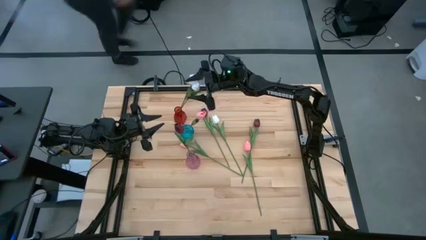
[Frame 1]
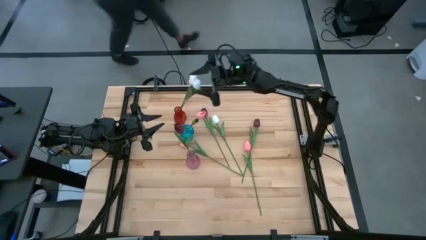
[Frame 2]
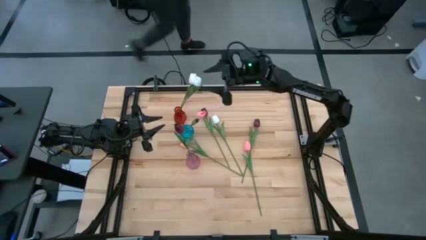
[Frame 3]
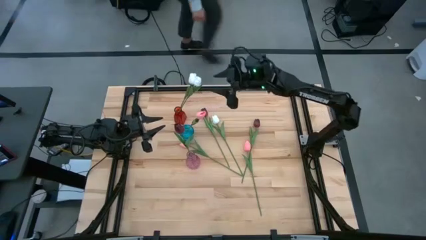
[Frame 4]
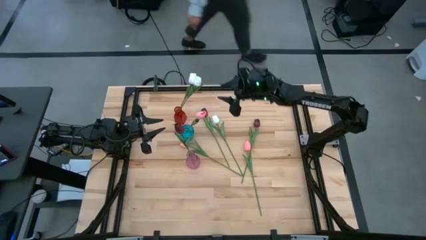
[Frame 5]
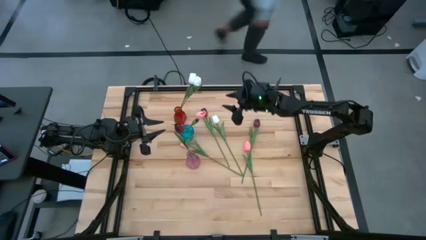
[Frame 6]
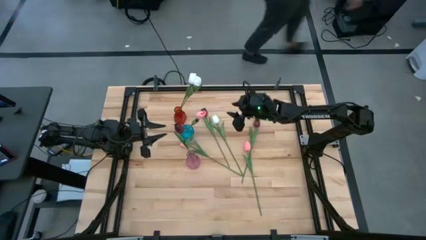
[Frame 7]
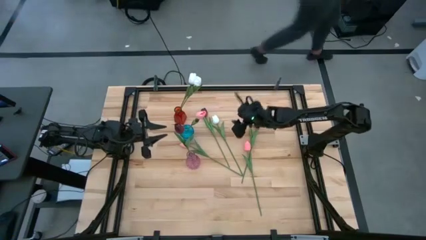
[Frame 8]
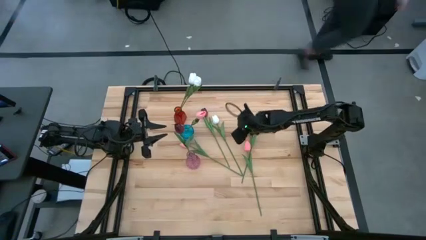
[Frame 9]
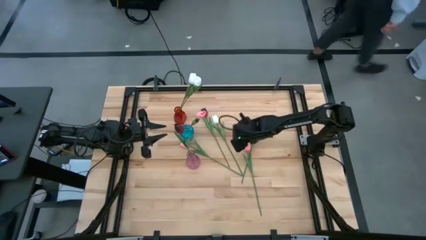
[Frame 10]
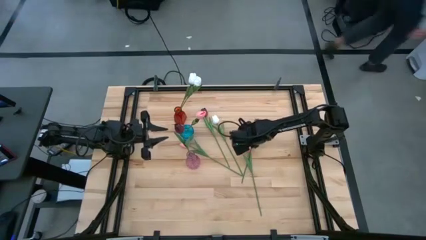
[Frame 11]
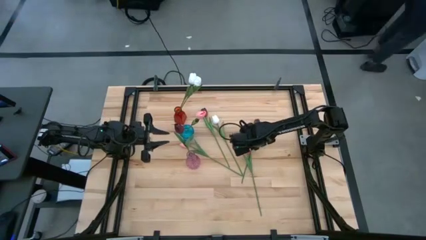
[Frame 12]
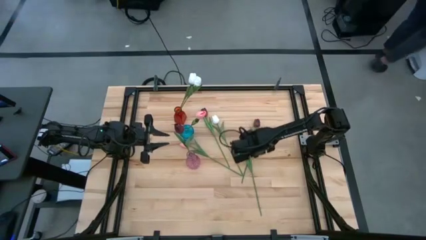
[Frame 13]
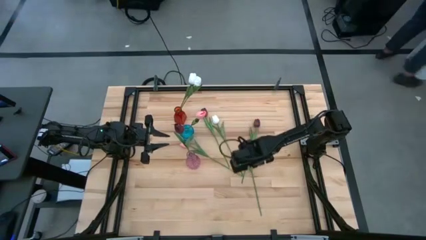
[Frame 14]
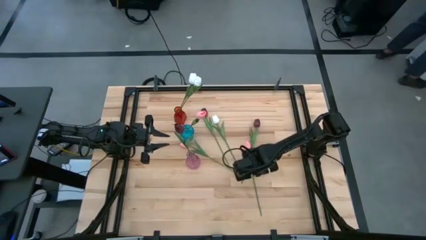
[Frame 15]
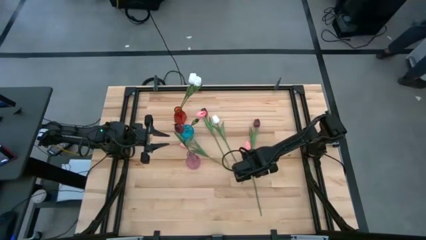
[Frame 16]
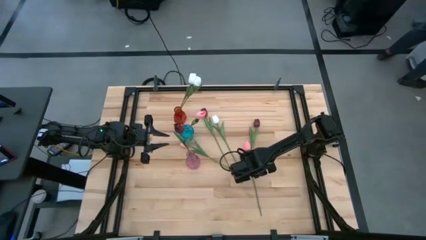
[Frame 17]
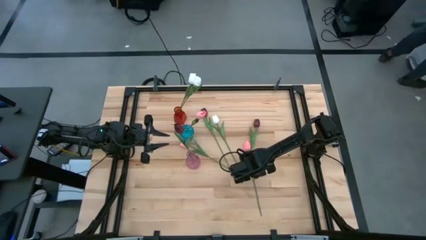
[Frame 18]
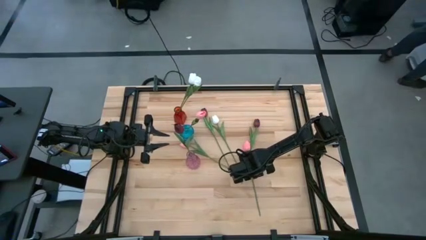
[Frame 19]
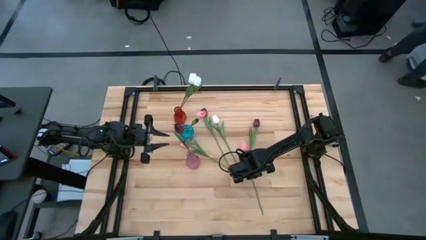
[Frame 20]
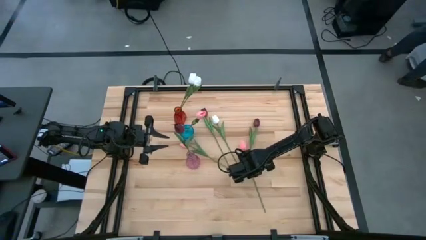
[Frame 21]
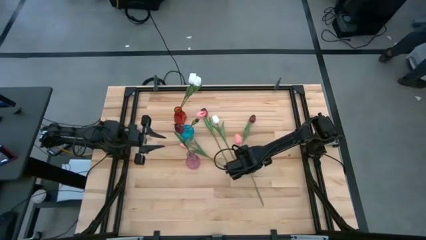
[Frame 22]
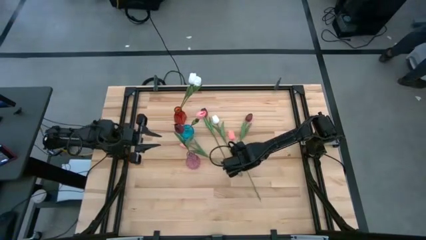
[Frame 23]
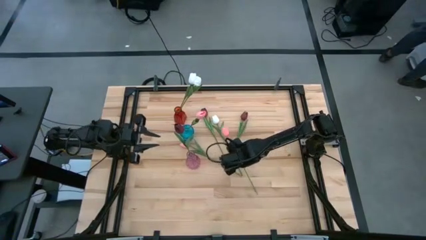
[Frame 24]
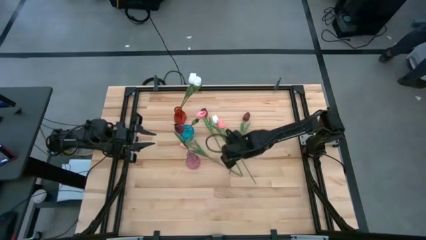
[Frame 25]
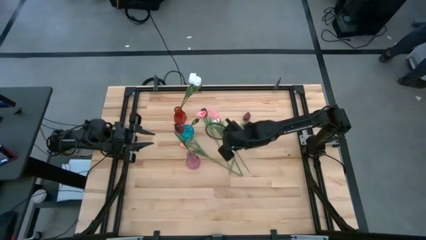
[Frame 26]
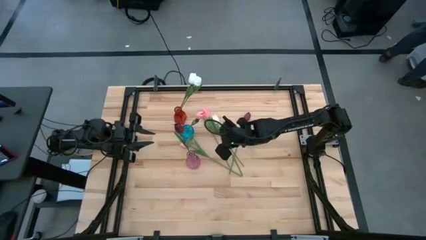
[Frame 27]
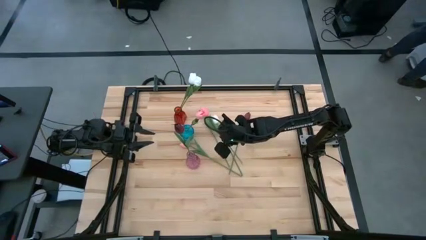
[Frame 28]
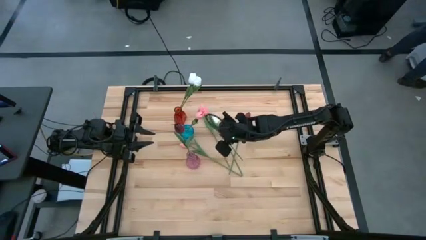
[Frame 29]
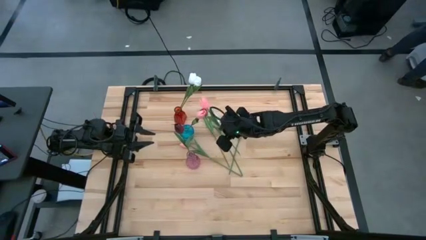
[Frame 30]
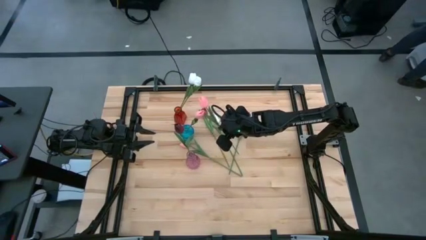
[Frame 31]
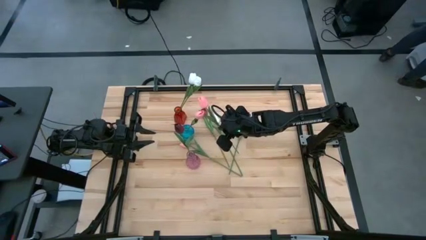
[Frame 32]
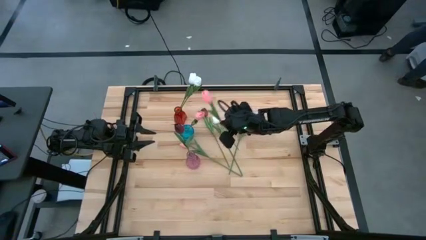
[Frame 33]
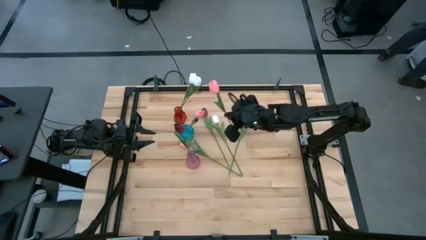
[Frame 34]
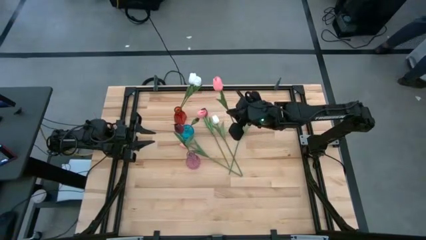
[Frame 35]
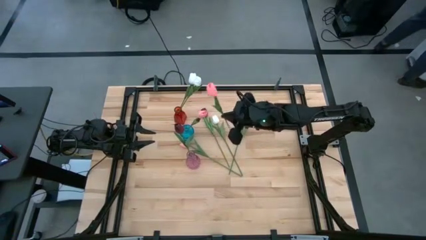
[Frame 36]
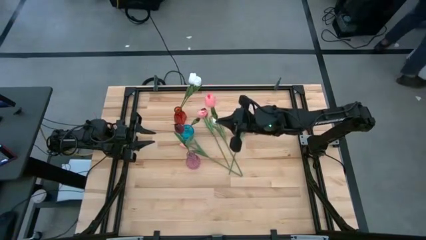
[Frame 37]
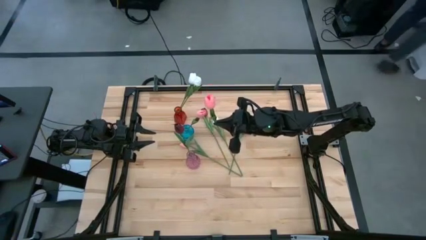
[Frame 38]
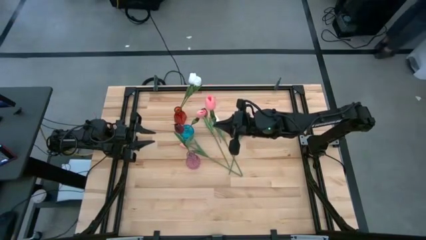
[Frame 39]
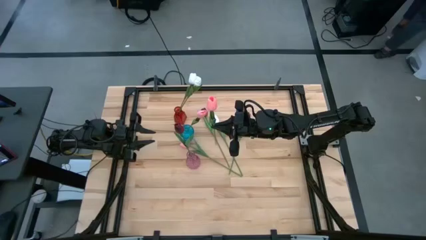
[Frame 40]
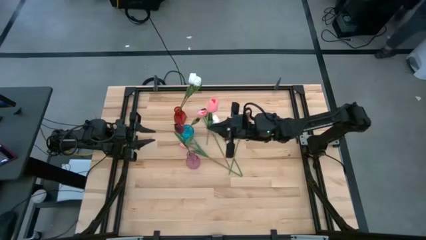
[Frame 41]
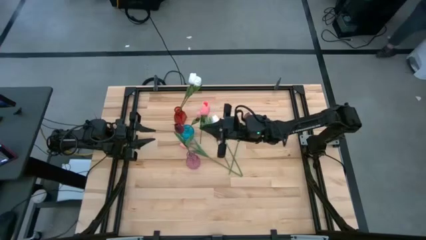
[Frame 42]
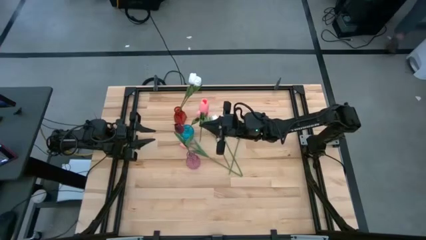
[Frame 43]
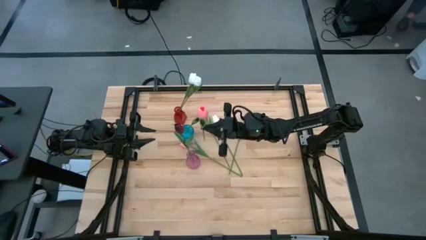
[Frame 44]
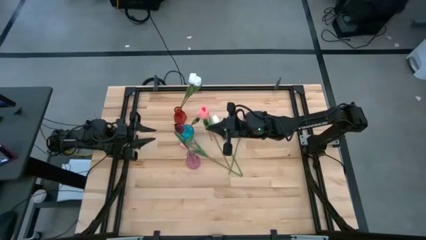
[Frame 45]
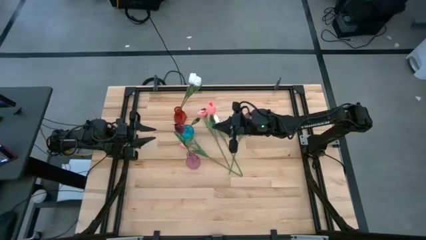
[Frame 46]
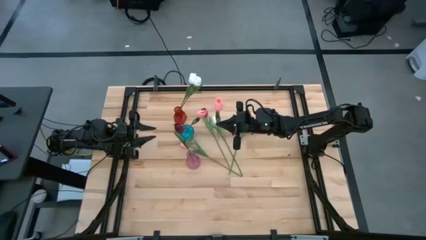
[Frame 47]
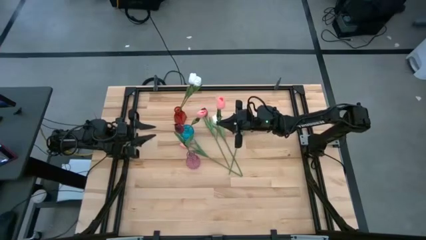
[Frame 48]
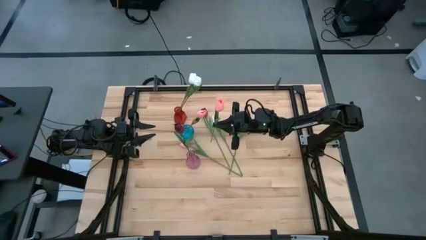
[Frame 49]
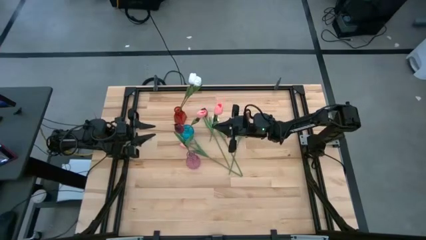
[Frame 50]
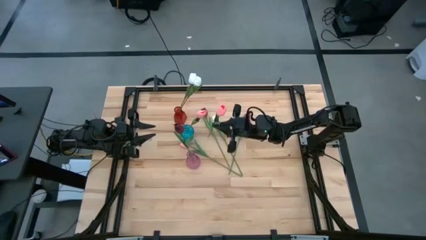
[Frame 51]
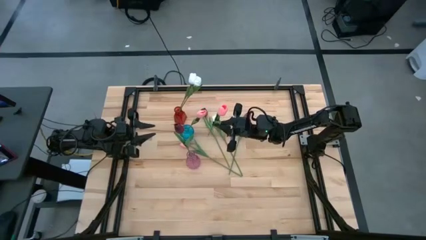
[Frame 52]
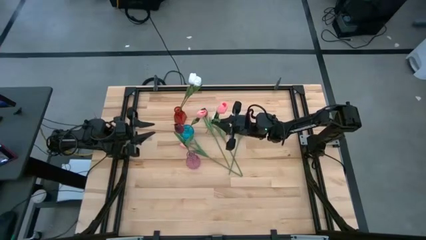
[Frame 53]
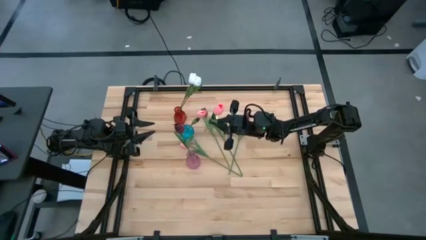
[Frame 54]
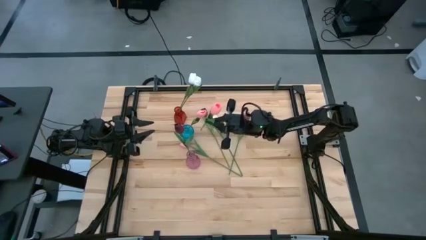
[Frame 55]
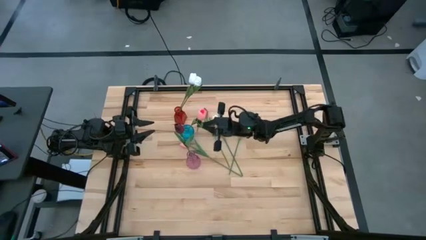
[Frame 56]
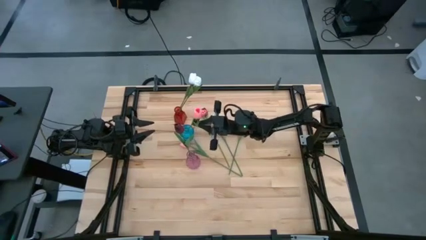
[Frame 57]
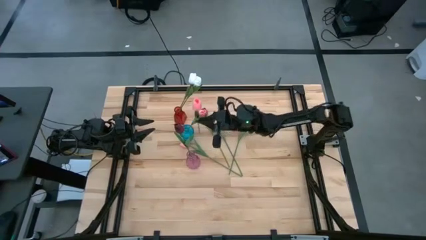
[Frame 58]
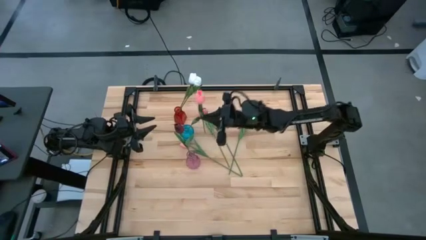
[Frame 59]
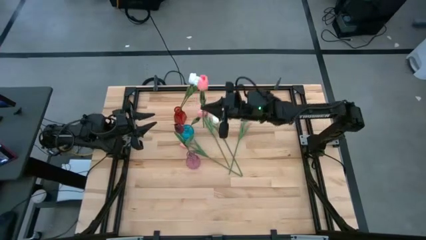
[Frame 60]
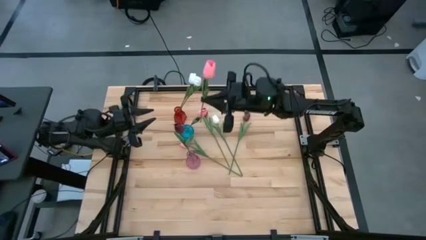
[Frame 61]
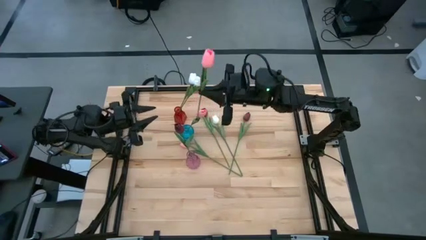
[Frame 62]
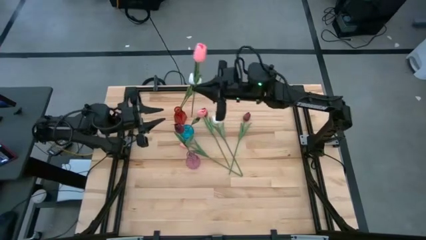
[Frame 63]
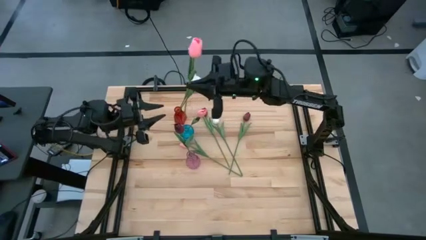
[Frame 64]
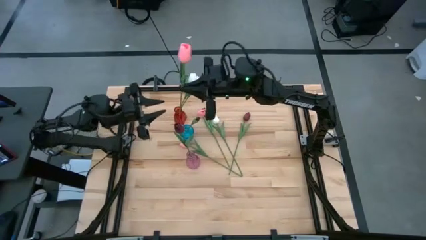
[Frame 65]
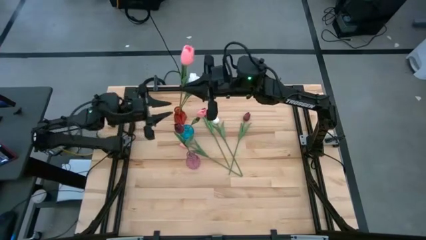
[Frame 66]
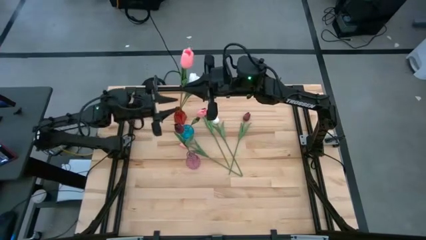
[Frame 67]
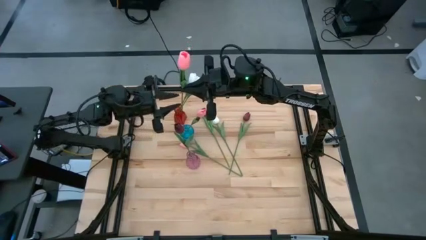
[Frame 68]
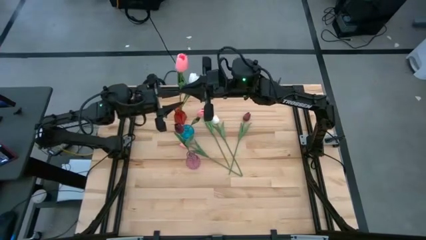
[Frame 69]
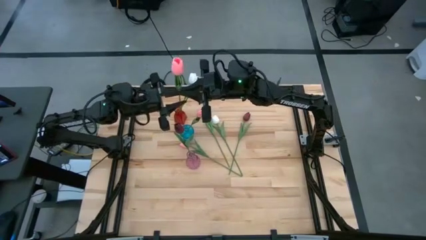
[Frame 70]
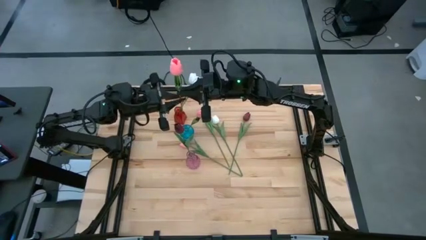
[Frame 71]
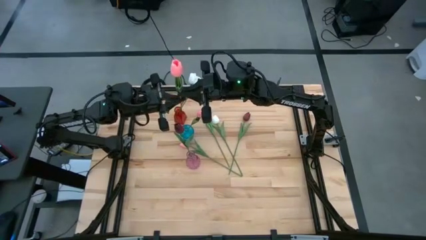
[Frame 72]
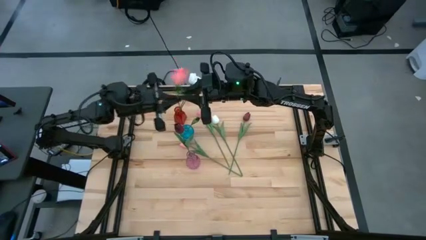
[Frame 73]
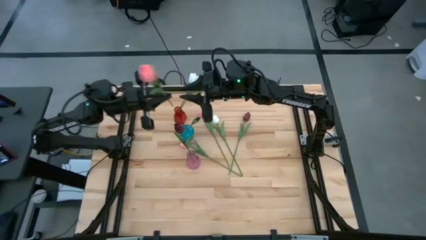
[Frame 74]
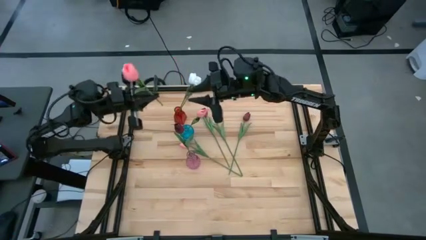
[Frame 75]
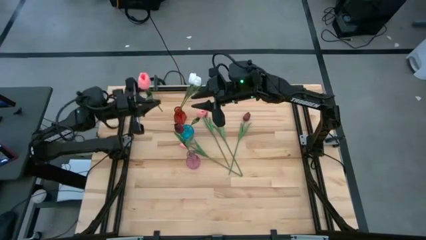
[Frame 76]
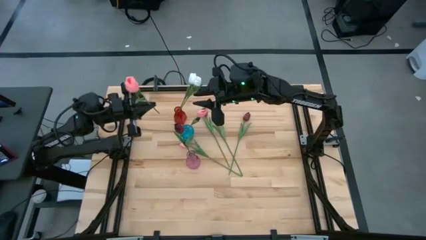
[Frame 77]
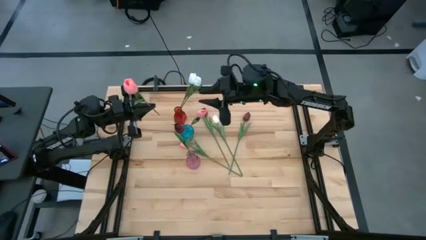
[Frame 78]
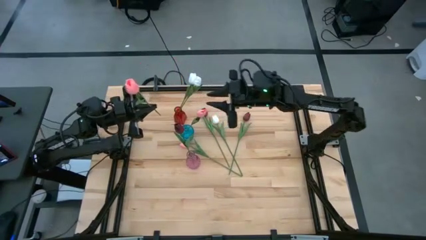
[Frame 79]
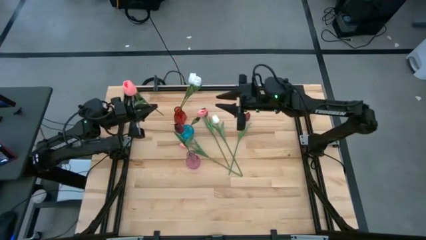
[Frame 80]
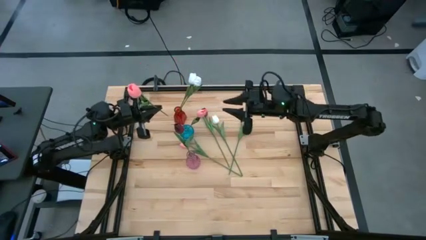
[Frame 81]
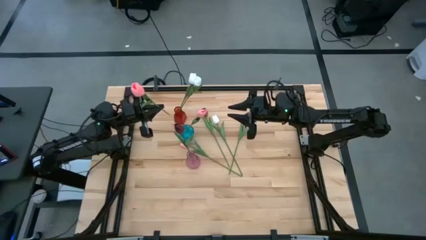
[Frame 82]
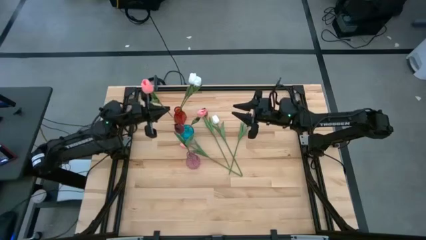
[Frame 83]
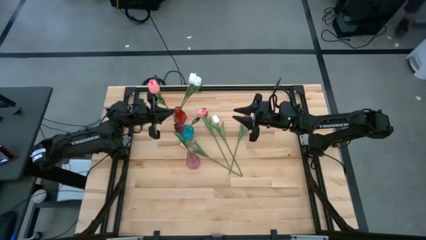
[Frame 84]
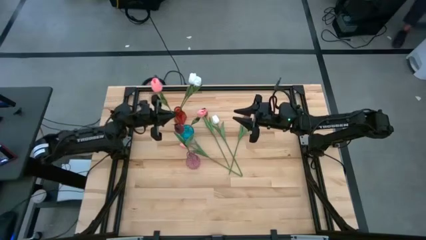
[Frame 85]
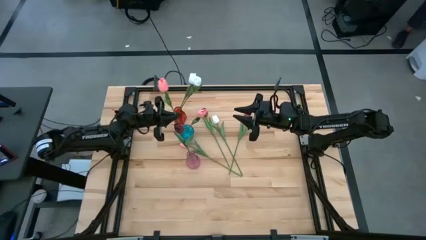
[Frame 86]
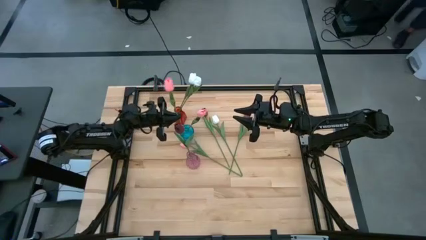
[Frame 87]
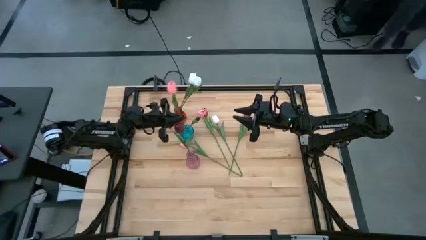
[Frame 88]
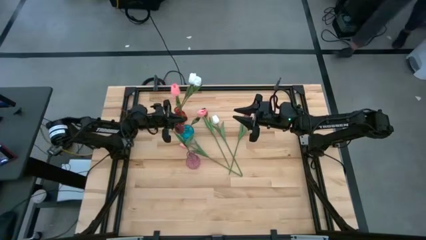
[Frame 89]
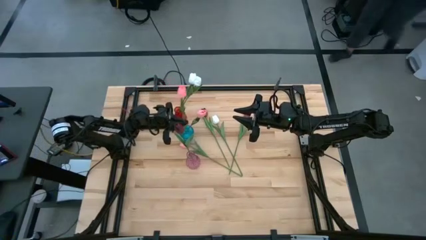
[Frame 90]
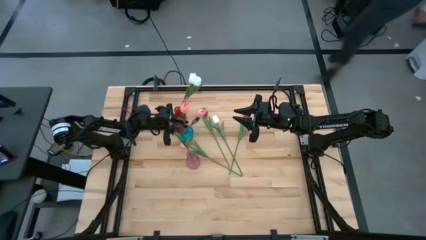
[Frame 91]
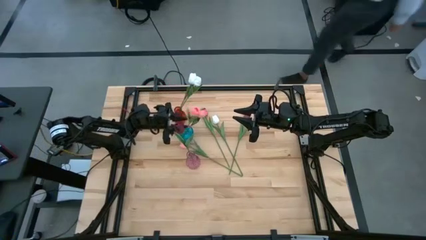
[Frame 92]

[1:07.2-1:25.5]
Task: Sort flowers into vase by color
Put the right pink flower into the blue vase
